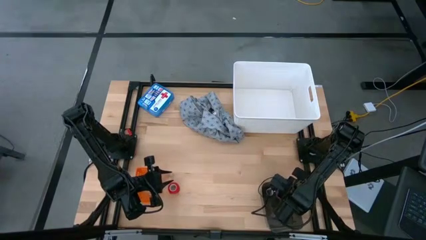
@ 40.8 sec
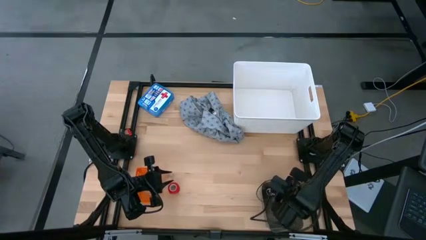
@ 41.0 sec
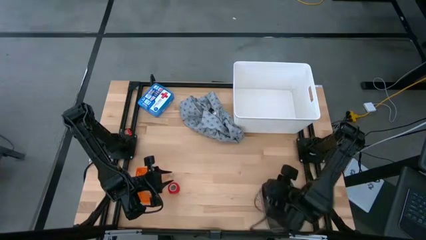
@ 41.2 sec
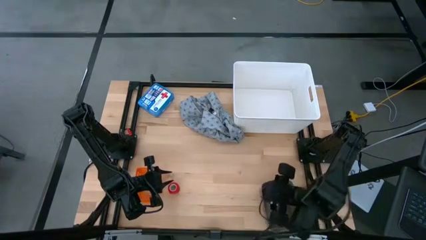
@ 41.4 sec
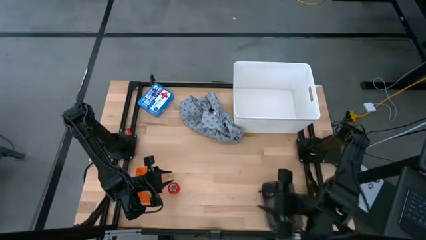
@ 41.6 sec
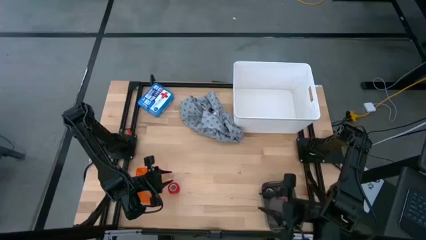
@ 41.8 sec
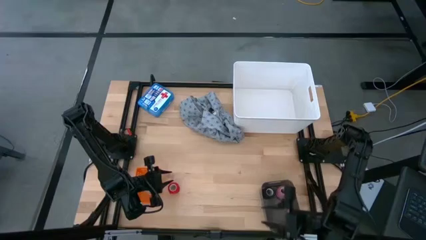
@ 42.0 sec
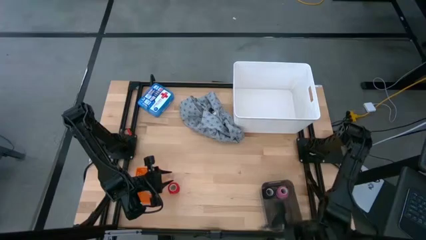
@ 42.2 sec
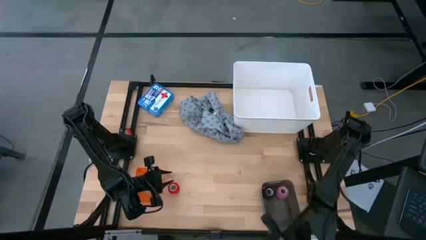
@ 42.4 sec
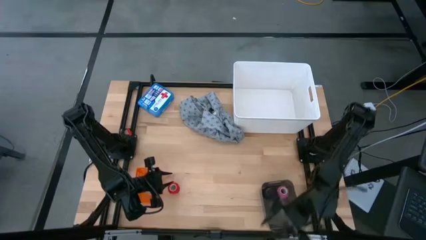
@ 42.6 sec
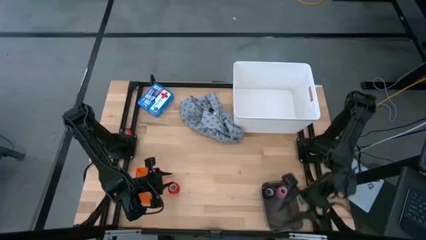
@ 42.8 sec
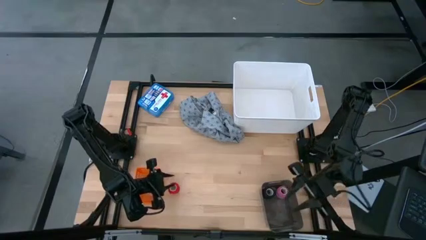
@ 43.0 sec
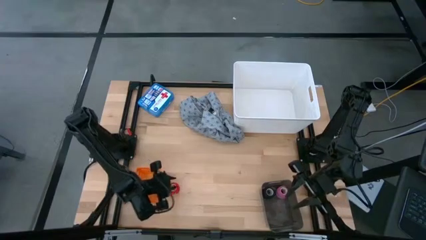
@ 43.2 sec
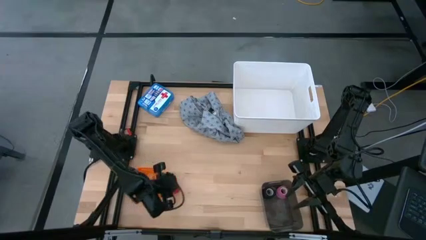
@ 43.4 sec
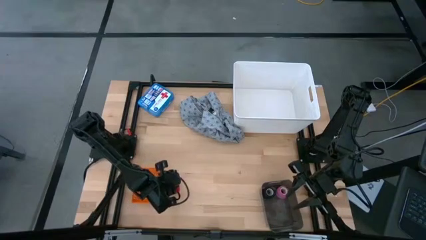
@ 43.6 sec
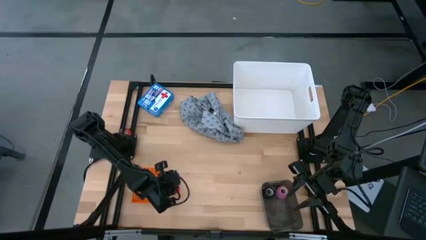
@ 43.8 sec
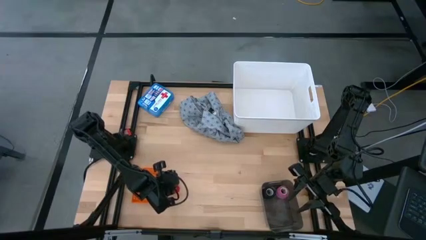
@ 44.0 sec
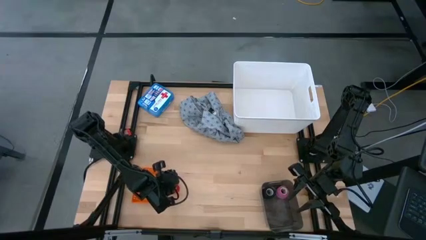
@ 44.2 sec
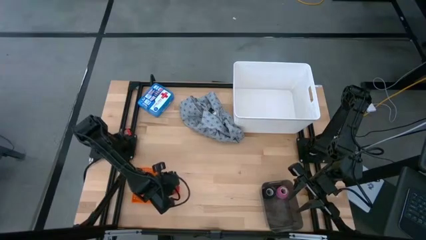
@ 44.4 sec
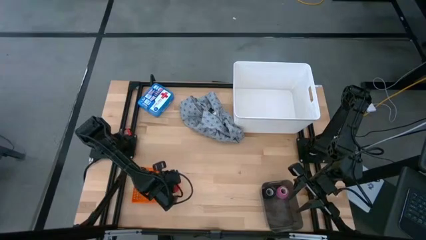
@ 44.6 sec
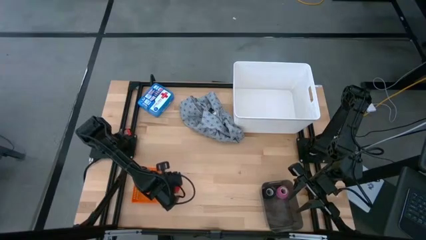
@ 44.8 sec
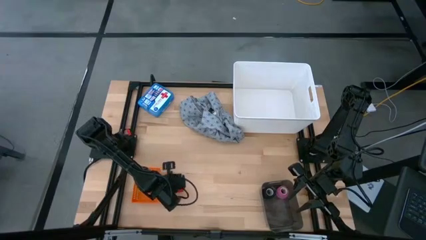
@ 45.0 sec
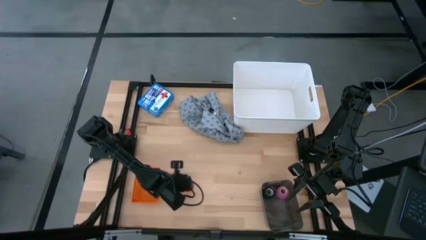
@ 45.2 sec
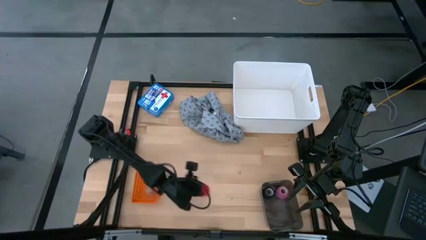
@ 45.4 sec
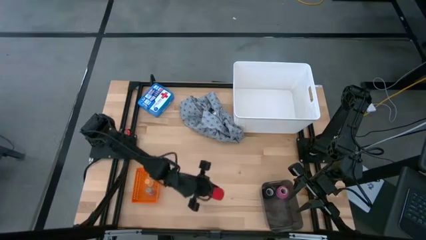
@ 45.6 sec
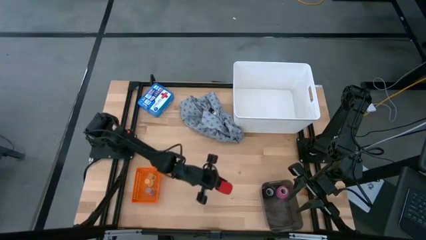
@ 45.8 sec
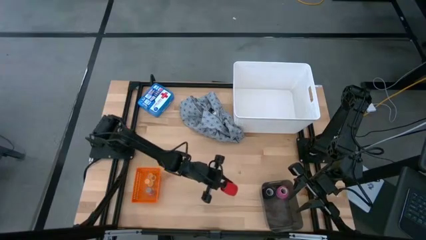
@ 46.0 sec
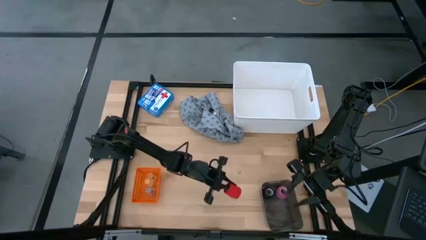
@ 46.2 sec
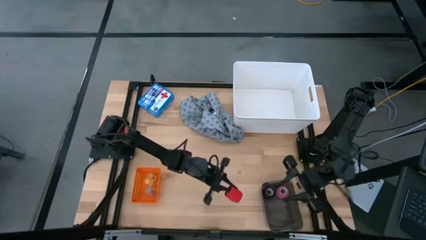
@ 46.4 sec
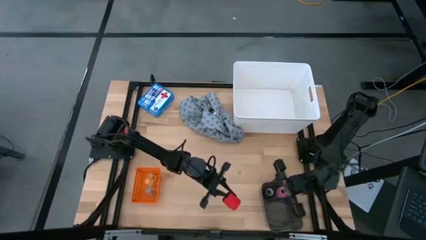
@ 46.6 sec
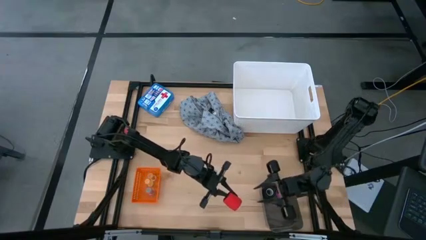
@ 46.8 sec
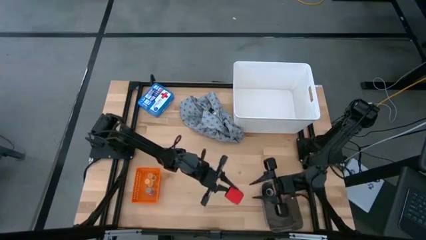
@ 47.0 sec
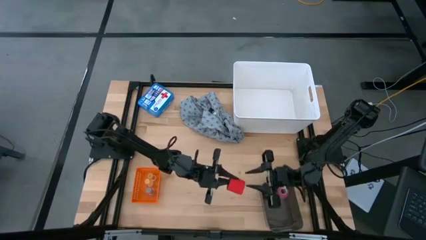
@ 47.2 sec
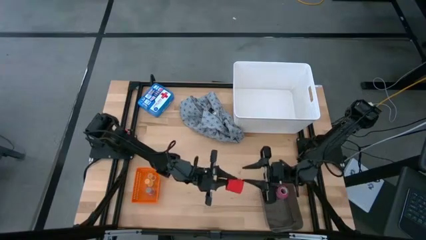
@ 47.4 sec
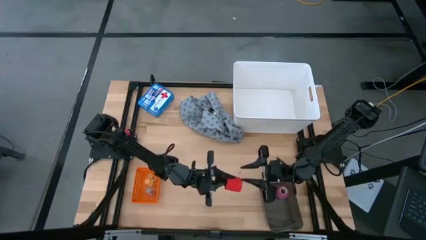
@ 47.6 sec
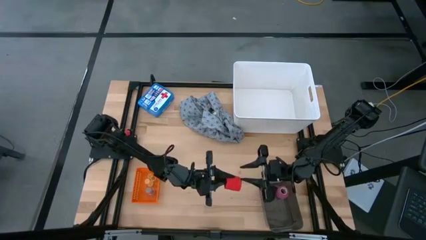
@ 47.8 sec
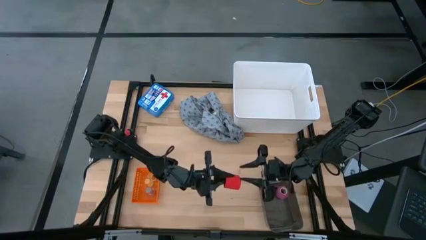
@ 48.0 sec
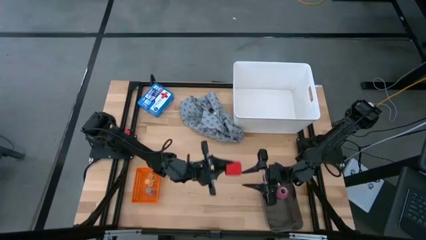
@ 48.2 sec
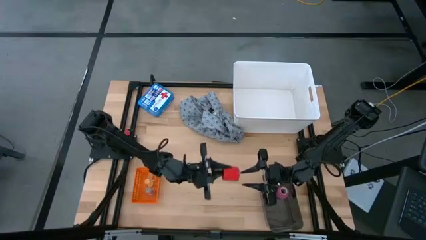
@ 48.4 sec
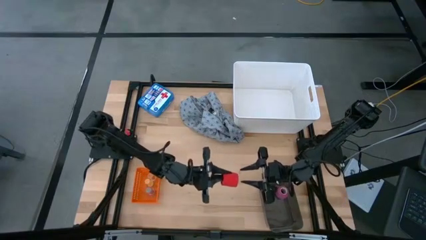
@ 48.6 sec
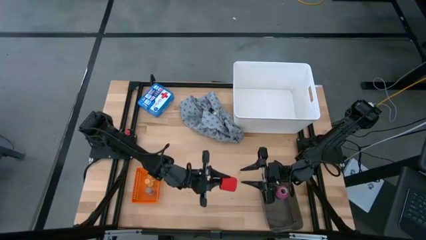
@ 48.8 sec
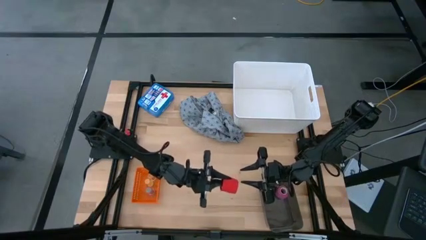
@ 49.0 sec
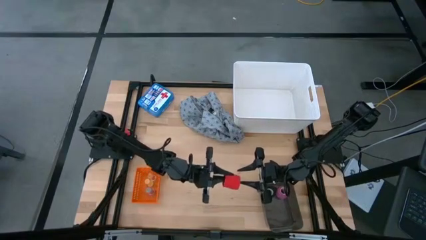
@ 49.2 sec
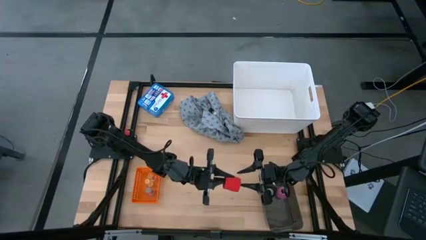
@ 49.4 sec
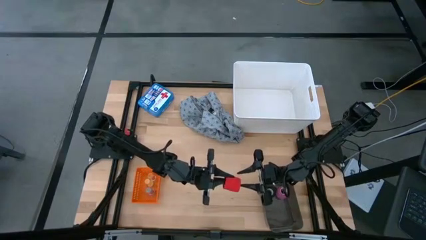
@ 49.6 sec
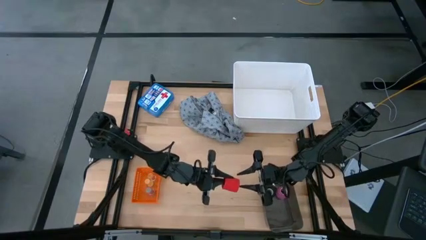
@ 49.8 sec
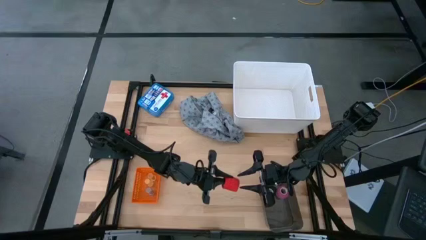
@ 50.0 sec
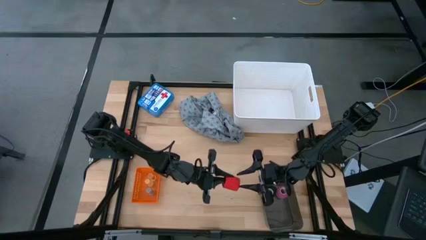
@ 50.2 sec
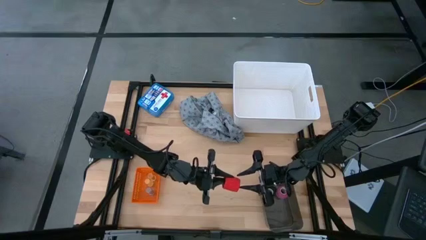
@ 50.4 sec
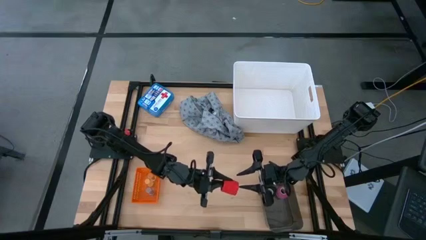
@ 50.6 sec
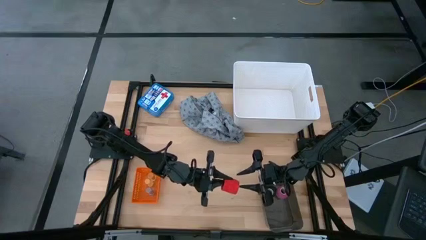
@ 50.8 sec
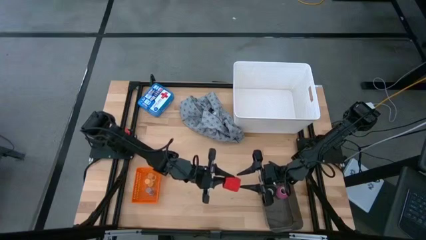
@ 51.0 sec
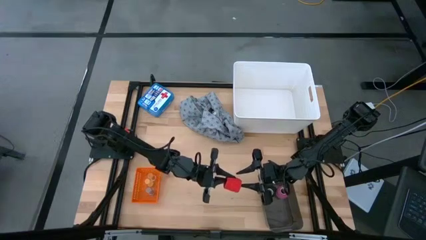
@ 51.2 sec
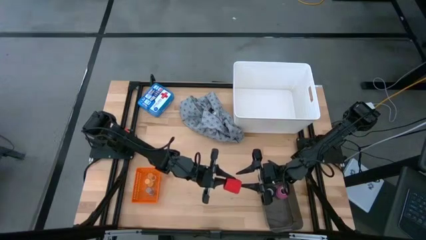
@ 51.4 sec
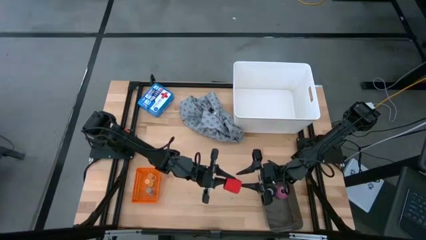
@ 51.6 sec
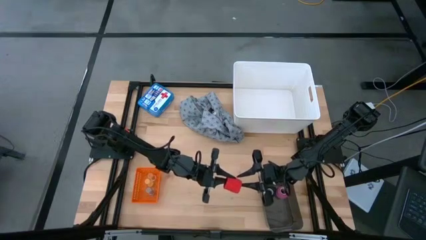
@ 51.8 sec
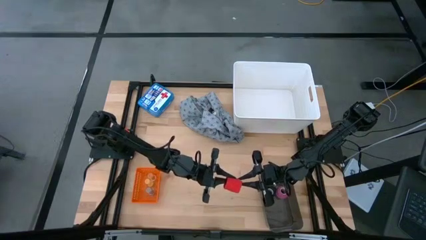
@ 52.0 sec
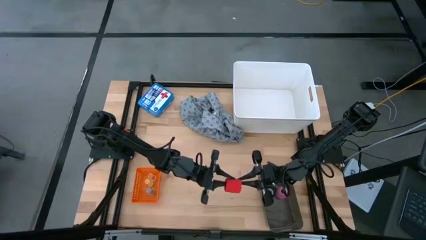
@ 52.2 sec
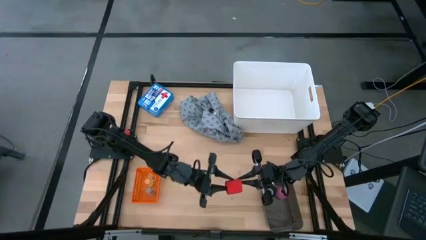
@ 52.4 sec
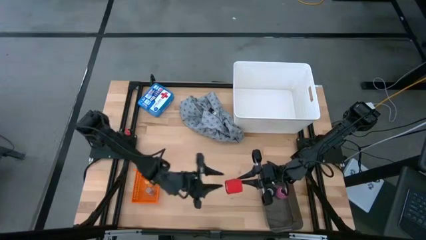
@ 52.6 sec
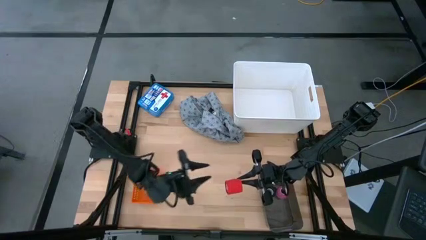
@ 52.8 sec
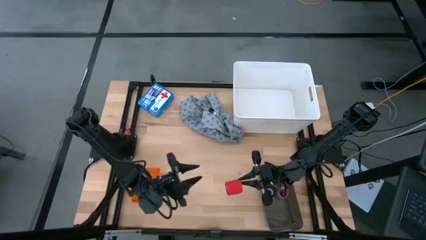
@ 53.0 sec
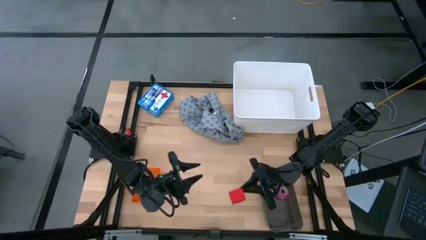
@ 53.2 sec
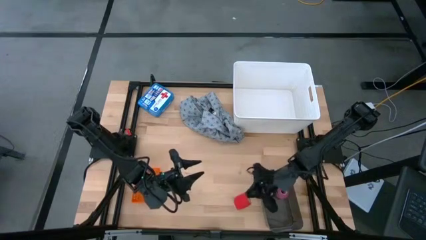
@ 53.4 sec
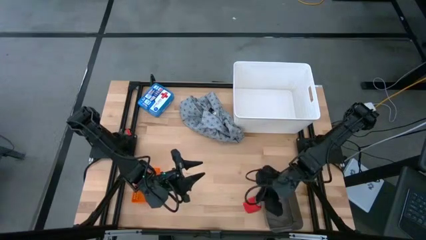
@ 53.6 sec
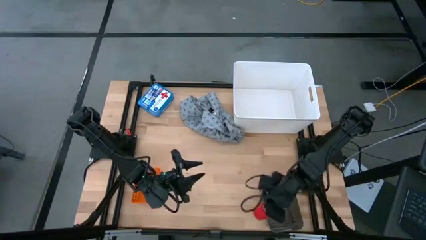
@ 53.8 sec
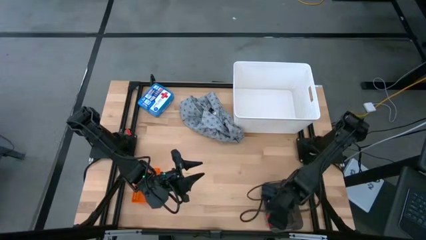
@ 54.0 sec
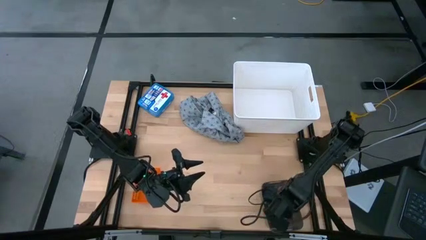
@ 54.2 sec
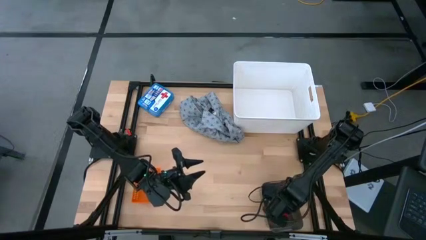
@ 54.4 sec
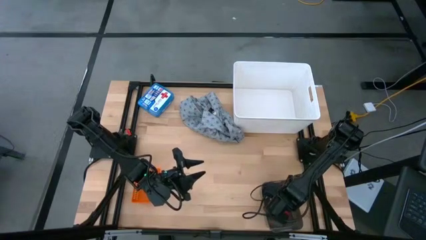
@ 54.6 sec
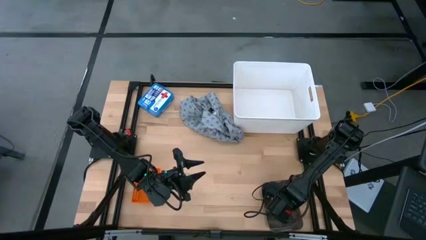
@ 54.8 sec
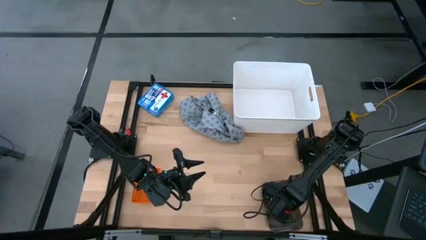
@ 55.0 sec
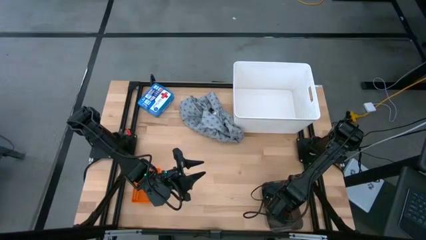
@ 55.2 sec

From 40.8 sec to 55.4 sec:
Task: Pick & place medical supplies in basket/bin
Put the red bandage into the black bin

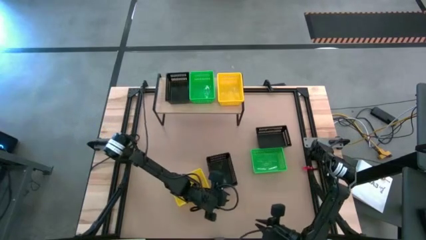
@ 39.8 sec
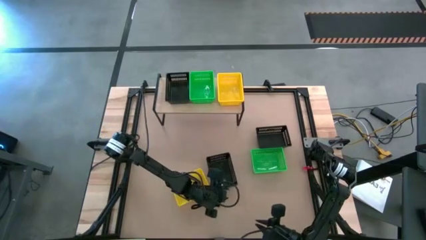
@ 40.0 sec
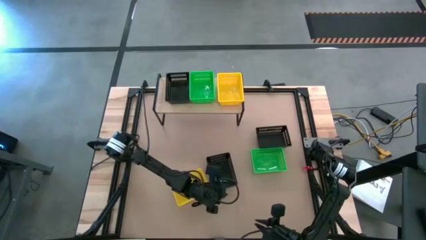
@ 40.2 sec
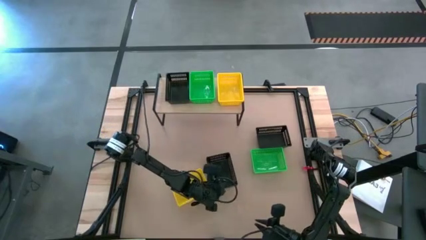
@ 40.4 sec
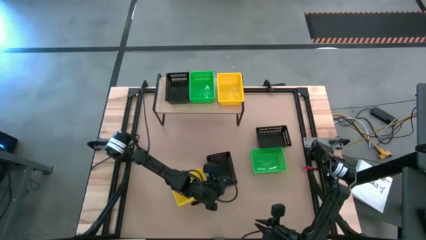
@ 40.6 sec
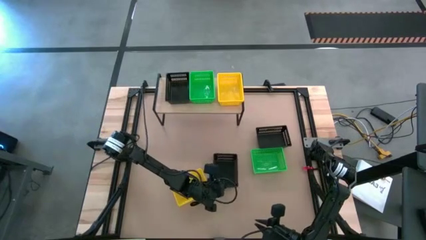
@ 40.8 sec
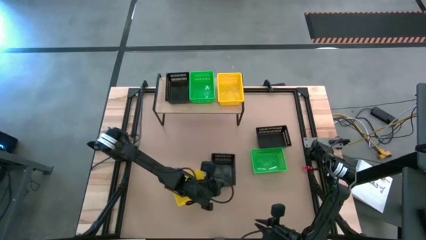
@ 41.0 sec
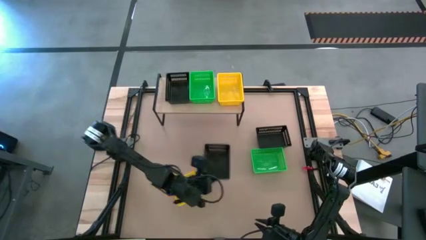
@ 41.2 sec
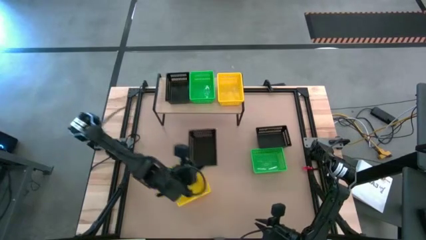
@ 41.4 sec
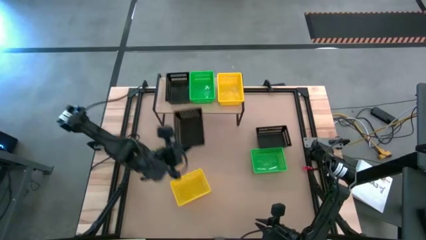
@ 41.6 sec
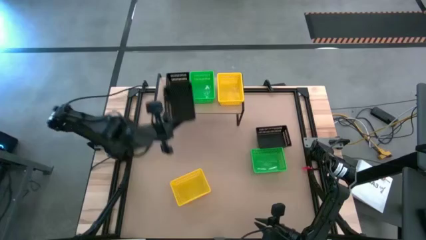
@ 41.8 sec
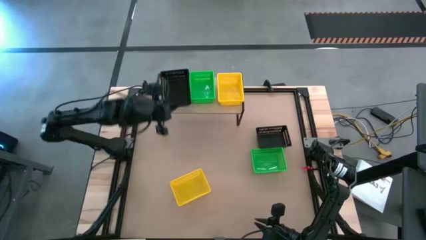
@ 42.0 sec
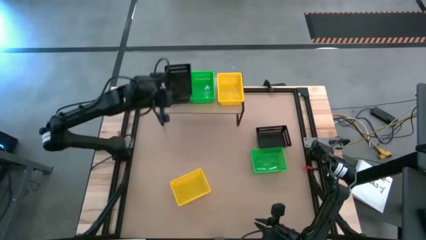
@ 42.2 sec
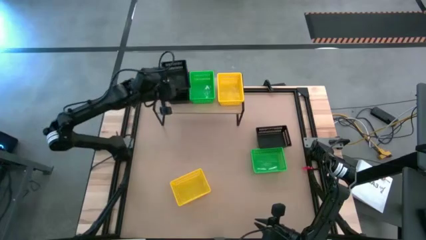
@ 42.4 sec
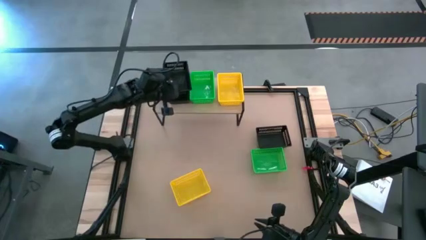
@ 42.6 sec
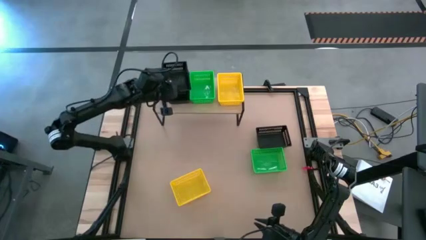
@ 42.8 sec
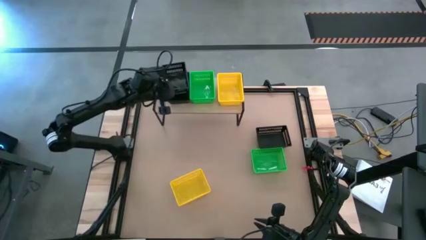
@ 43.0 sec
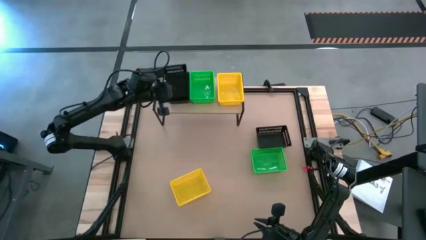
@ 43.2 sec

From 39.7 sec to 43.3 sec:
Task: Stack baskets on shelf by color
Stack the bottom black bin on top of the black bin on the shelf
